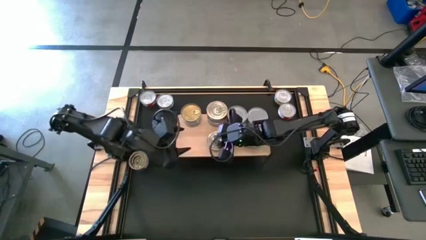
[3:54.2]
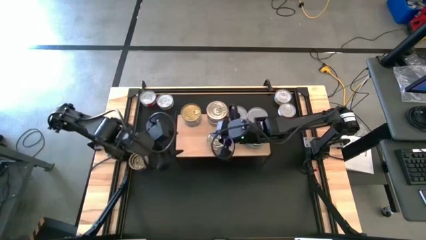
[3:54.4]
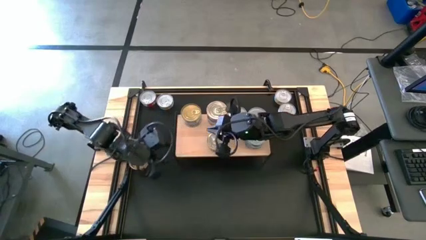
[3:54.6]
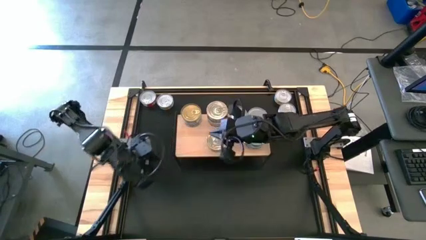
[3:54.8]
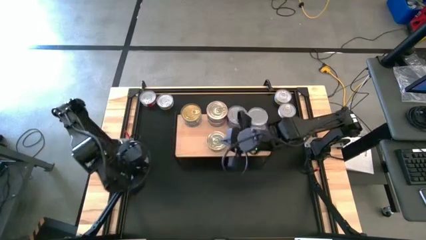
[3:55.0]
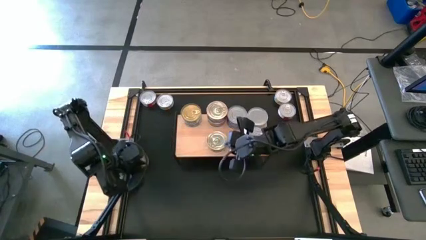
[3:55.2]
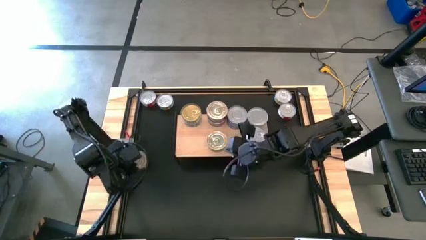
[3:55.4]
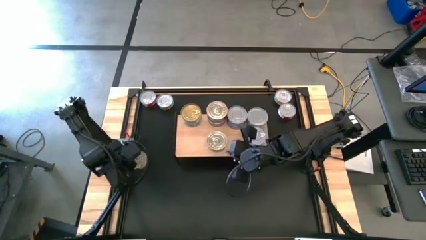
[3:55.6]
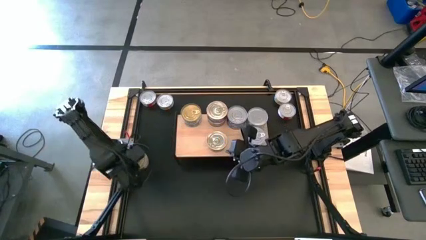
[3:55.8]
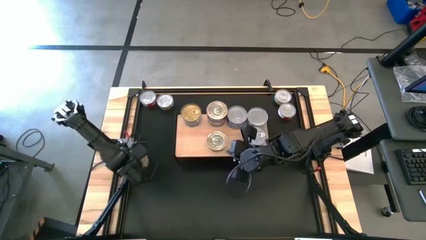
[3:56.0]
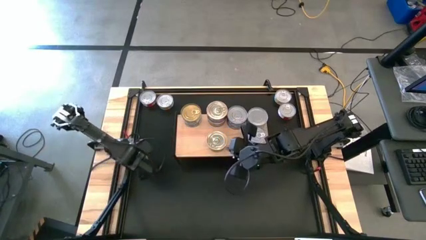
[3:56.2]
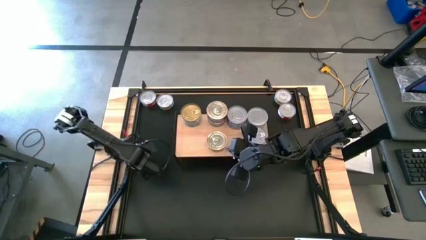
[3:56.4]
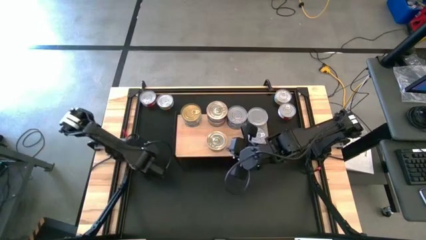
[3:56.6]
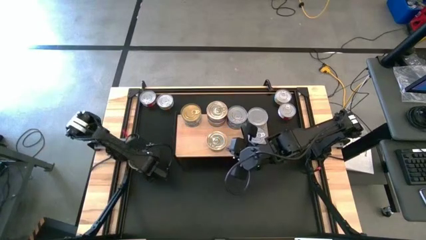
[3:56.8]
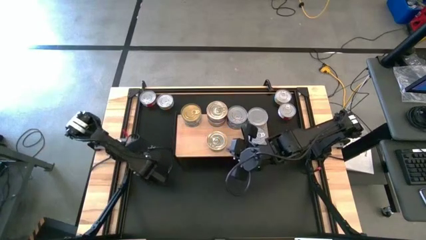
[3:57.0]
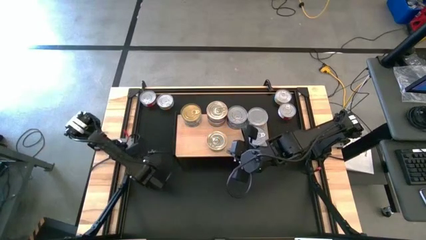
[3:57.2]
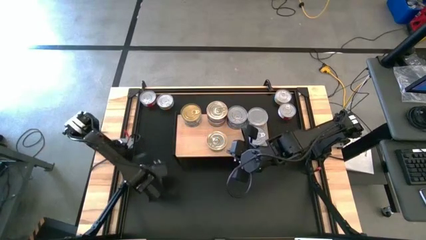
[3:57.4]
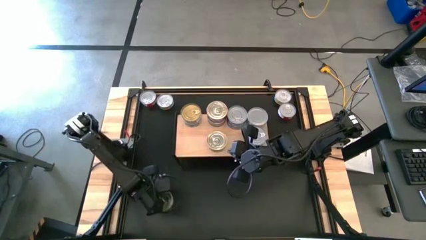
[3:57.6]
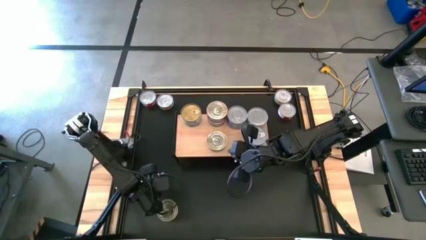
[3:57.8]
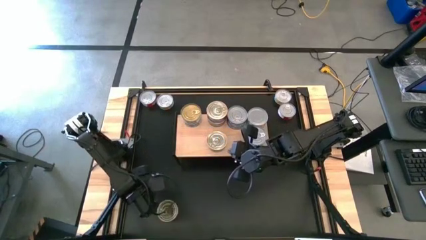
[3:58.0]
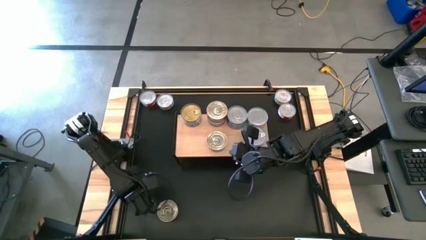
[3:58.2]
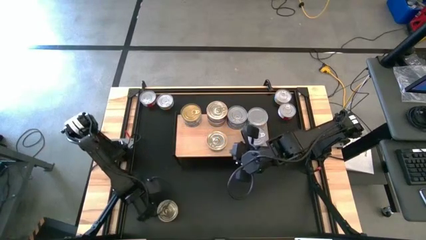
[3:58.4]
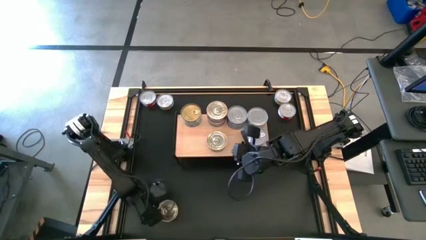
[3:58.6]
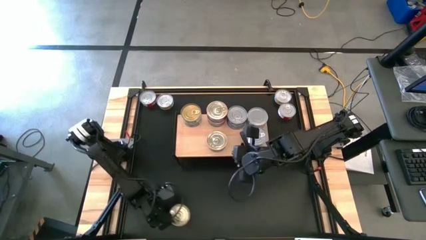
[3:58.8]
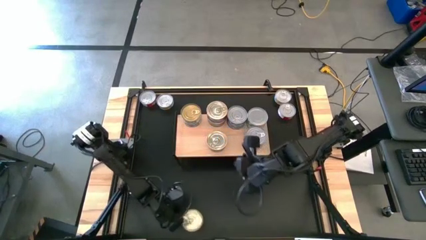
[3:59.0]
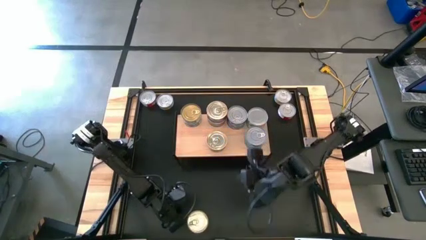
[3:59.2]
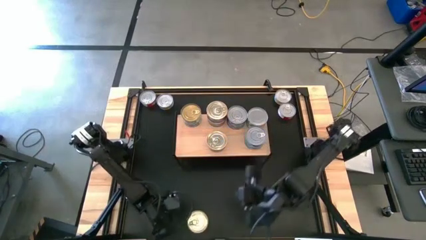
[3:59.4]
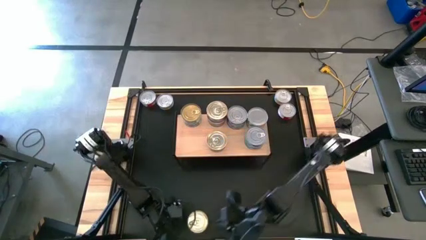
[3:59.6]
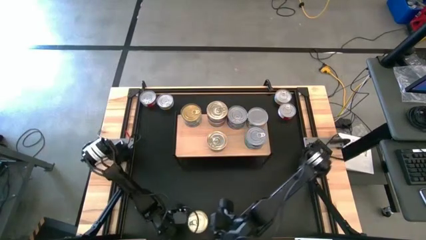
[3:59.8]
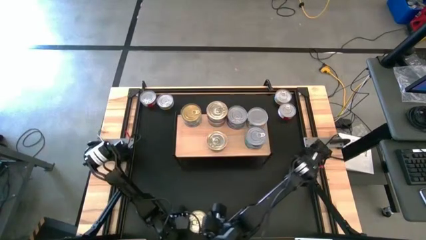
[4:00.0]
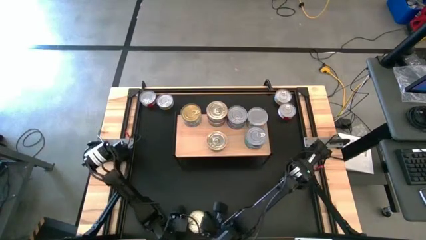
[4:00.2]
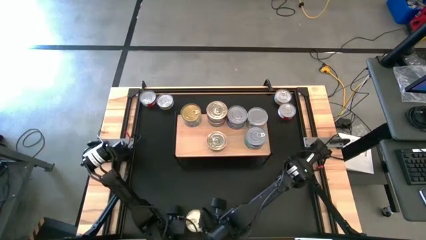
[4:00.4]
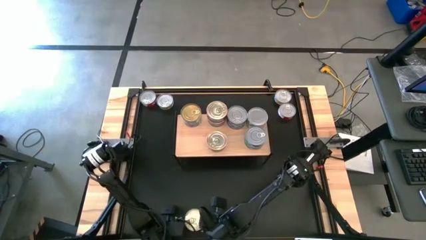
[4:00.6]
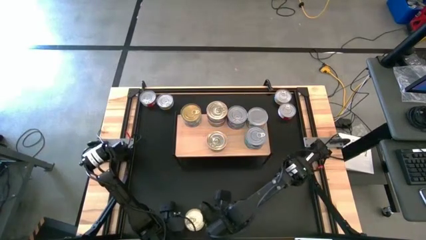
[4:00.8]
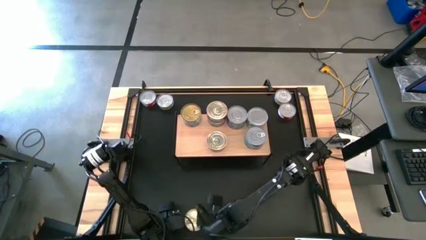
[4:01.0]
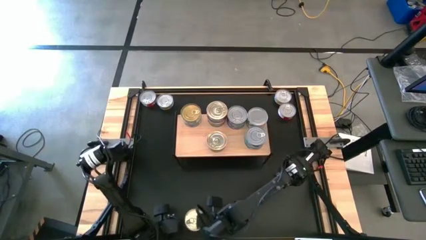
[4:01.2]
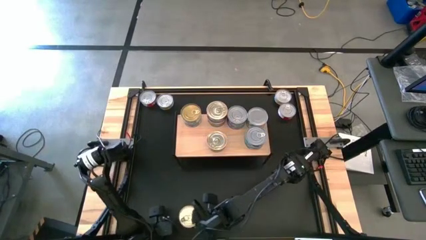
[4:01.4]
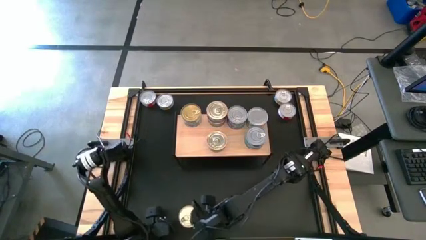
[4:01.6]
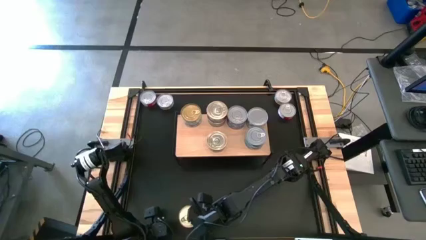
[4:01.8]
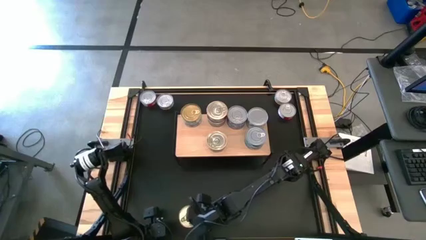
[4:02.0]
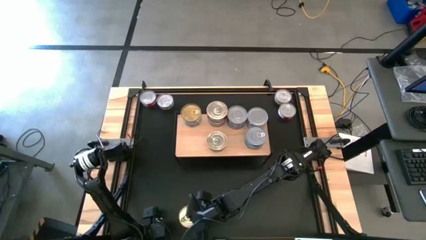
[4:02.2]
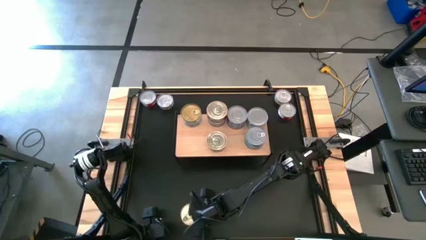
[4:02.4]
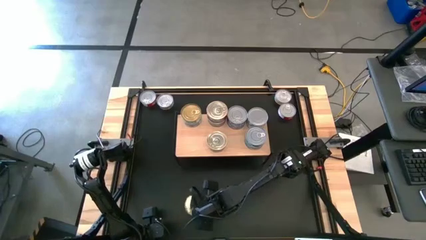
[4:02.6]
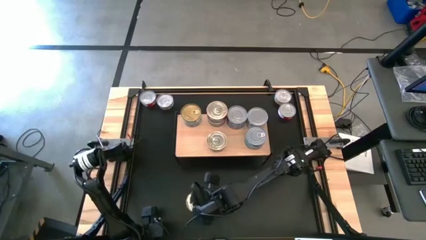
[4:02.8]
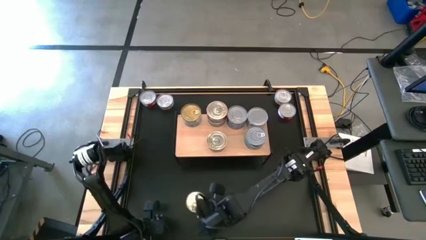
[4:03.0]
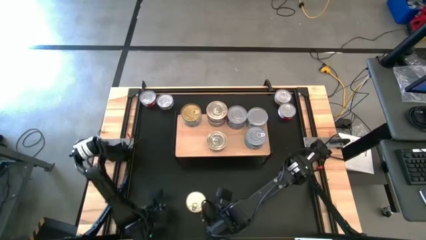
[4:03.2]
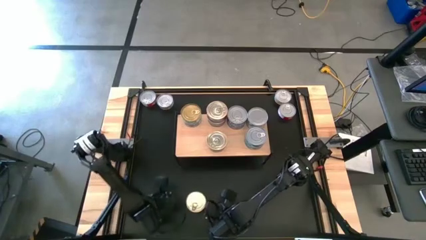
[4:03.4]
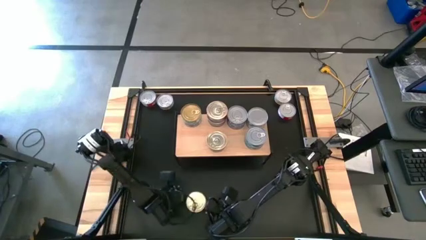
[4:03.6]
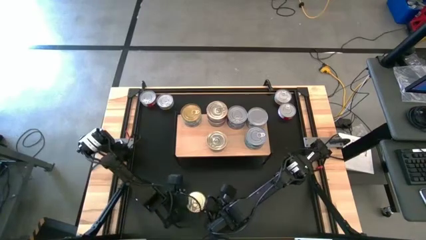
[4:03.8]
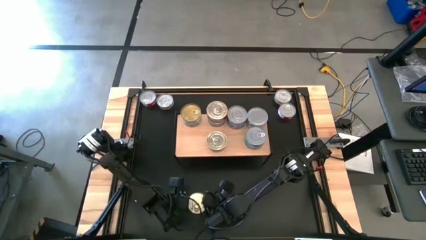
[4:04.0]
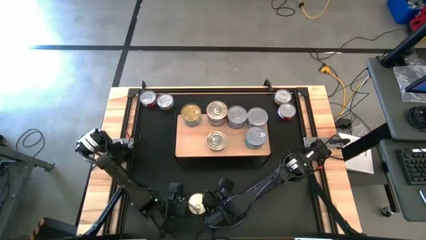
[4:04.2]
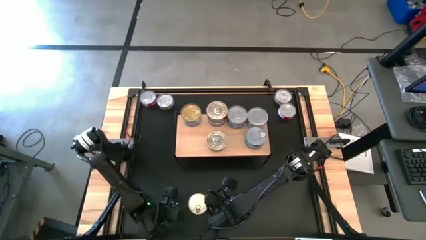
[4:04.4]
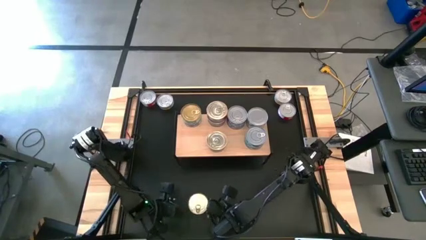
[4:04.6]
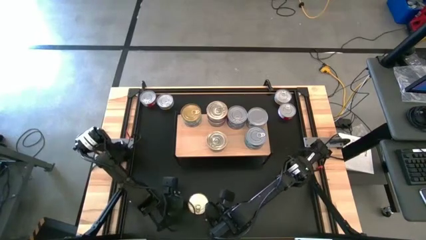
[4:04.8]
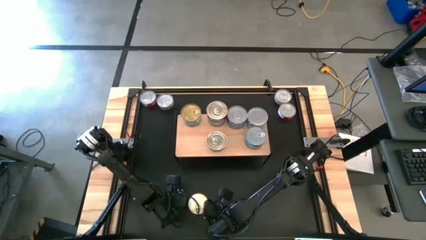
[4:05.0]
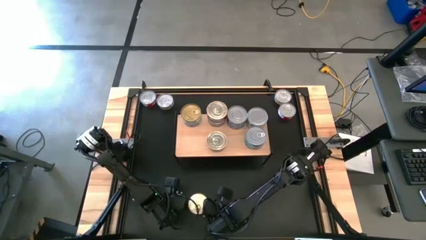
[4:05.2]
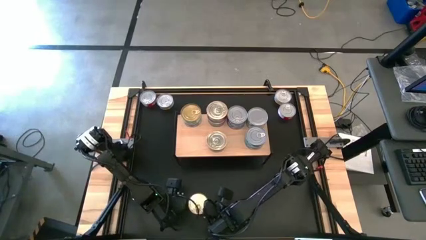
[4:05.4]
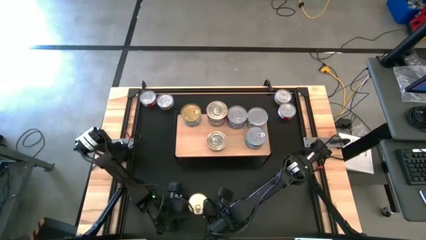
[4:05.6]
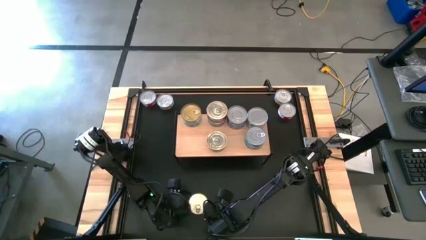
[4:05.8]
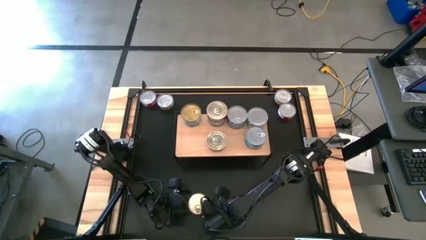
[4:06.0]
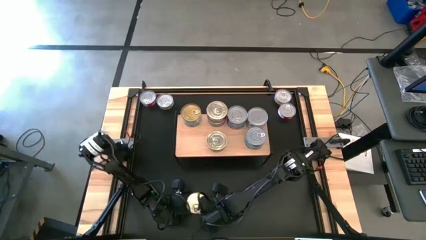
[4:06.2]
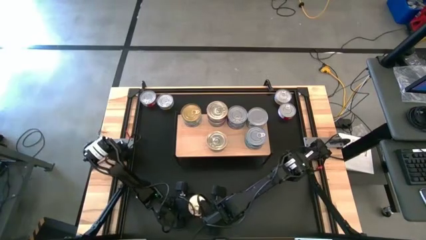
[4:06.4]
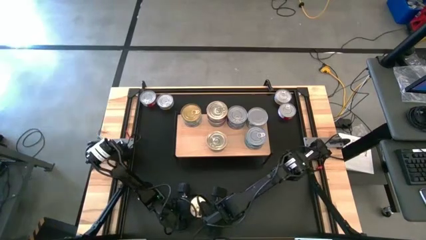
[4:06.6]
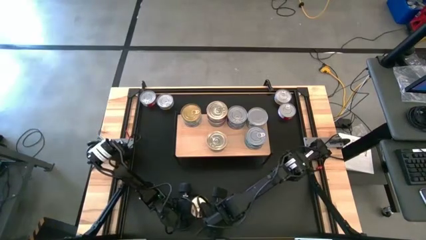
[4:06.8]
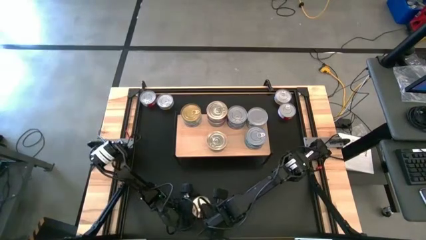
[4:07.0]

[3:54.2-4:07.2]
Task: Stack canned seafood by type on shelf
Stack the blue pink tuna can on top of the blue pink tuna can on the shelf

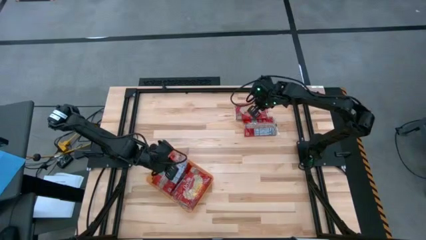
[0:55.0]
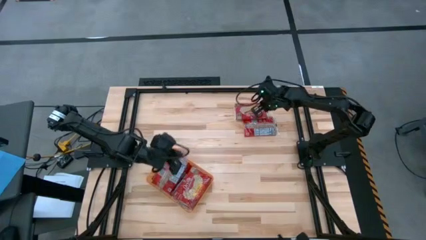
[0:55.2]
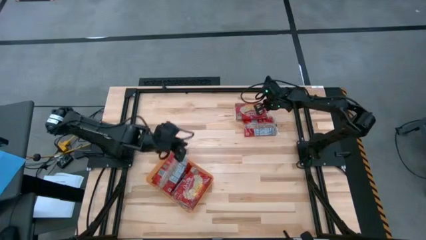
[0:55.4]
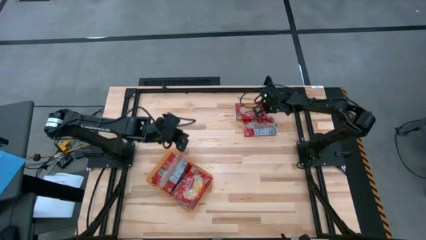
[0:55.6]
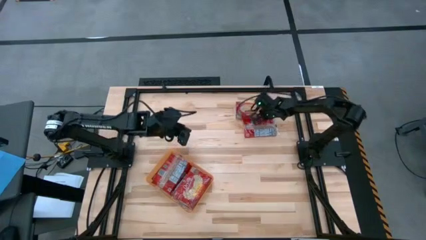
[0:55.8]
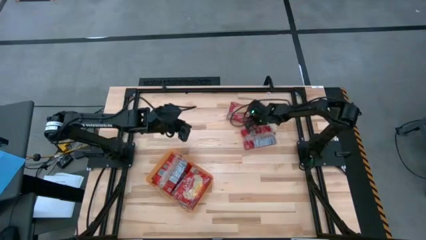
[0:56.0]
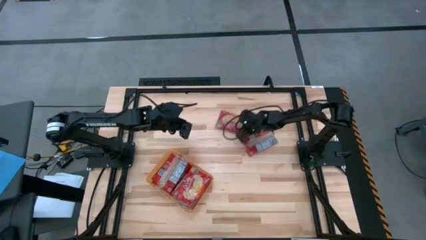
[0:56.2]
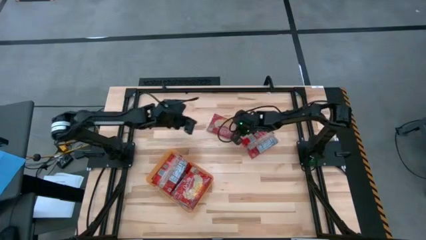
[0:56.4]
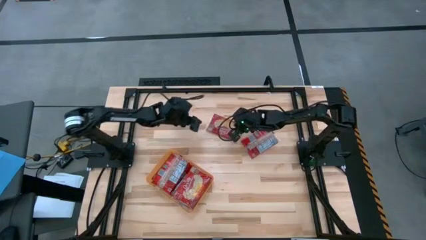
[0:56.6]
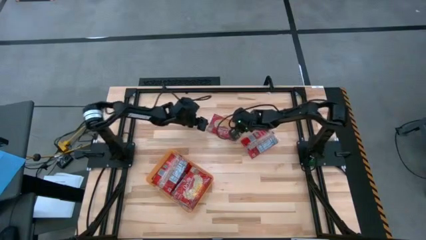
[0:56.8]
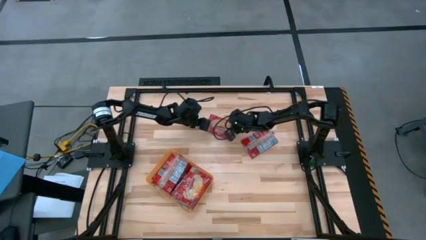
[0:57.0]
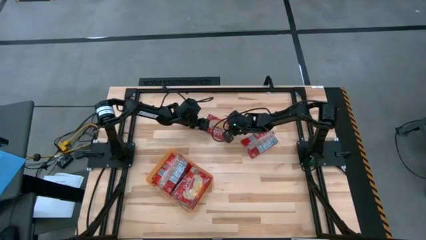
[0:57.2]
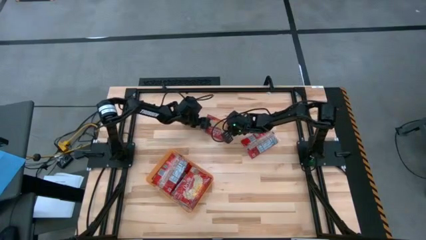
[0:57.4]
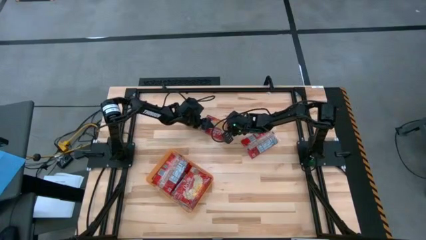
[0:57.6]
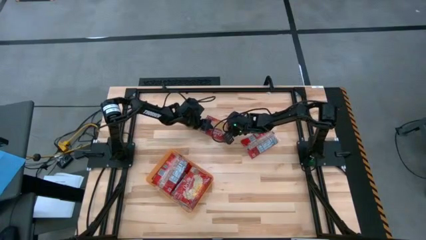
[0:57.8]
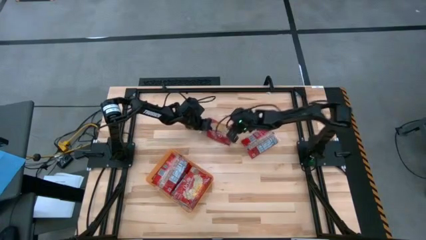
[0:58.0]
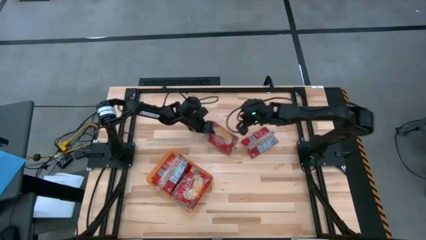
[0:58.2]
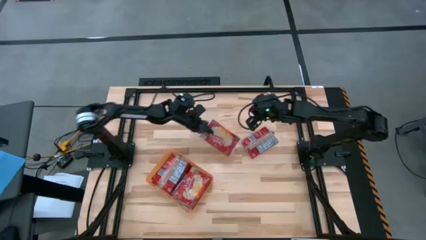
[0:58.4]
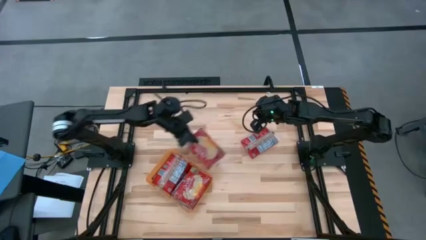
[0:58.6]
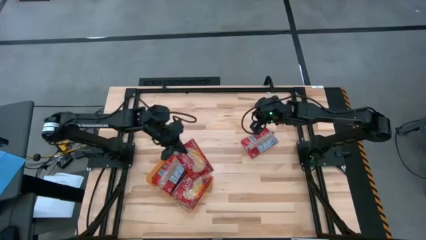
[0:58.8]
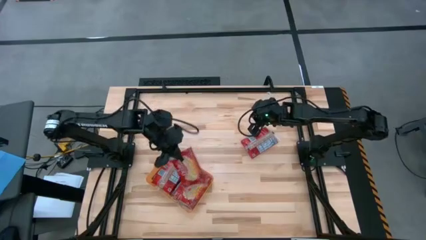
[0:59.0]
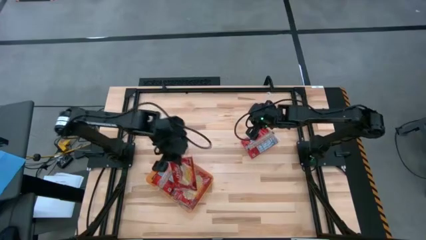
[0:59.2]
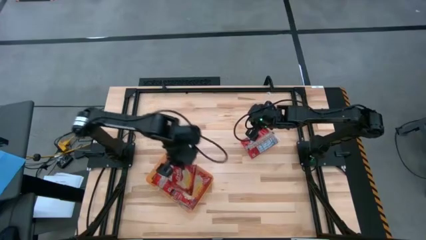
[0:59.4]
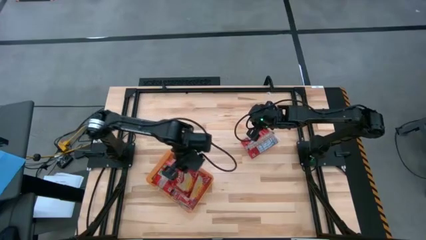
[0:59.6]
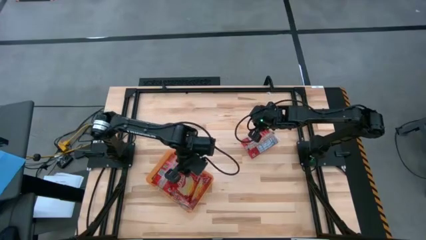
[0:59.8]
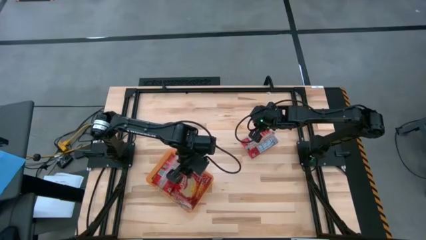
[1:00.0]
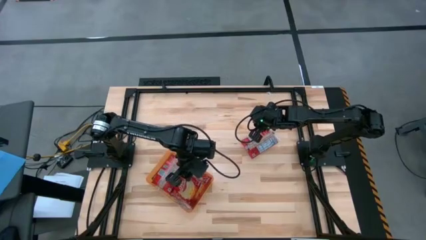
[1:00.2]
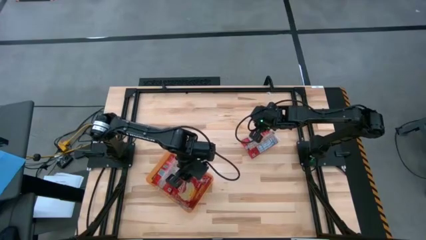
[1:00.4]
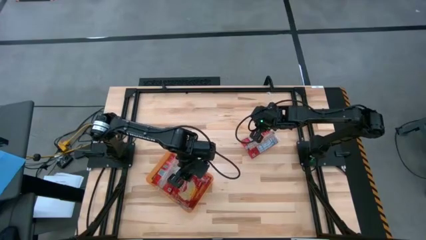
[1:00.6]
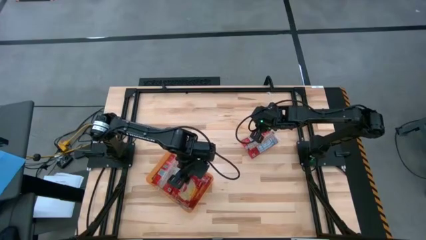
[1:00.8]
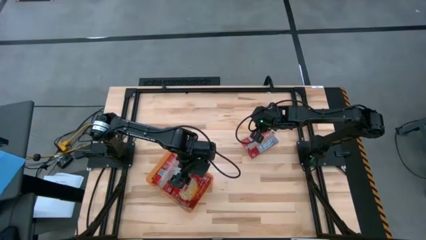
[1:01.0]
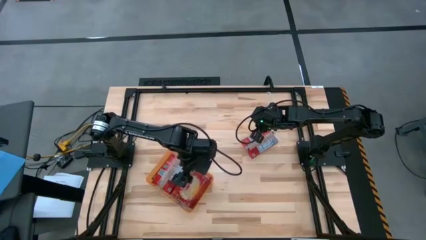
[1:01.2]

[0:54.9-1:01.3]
Task: Sort popcorn bags into baskets
Put the popcorn bag into the orange bin
